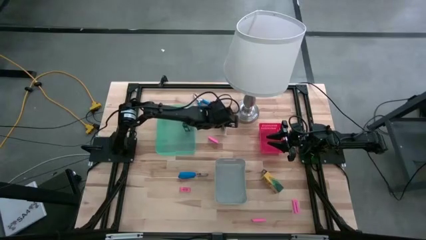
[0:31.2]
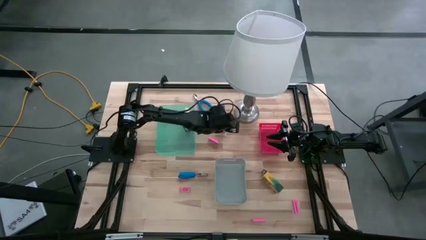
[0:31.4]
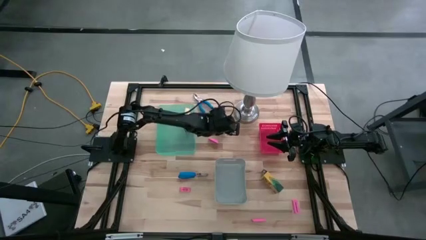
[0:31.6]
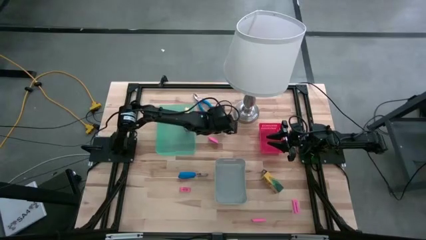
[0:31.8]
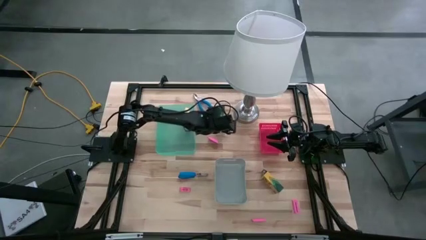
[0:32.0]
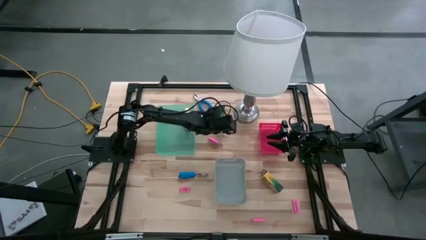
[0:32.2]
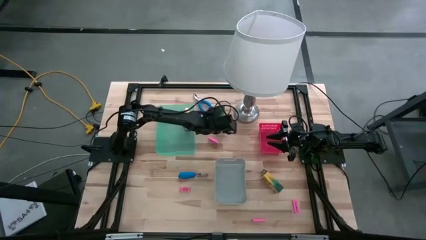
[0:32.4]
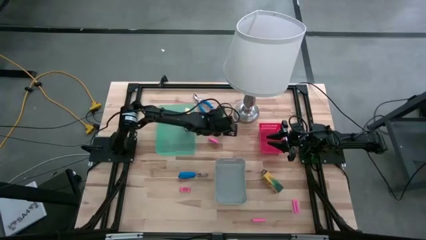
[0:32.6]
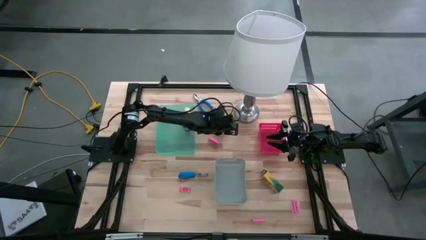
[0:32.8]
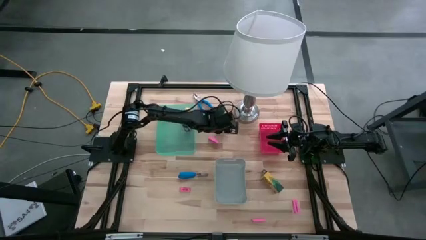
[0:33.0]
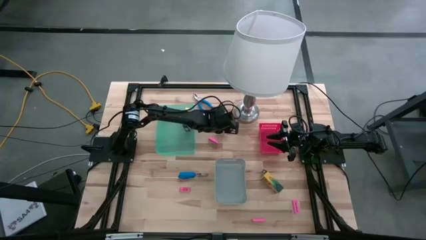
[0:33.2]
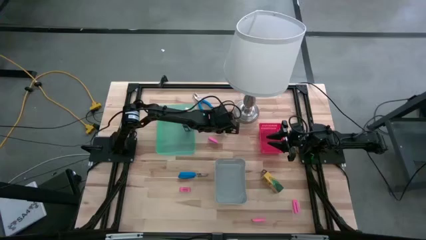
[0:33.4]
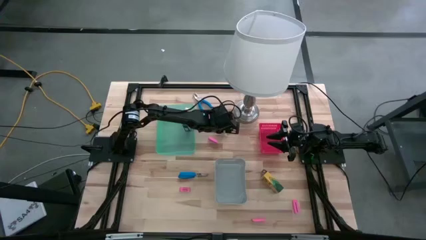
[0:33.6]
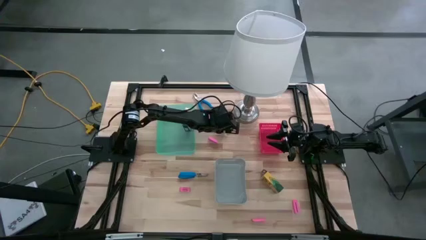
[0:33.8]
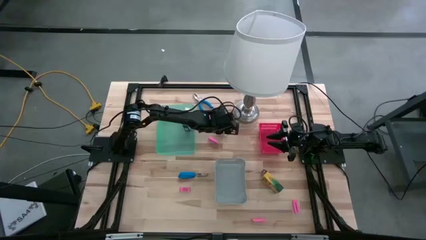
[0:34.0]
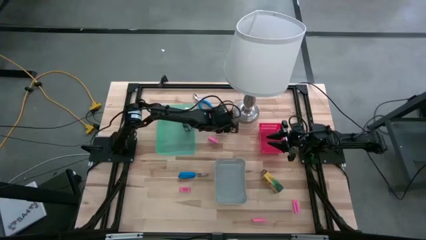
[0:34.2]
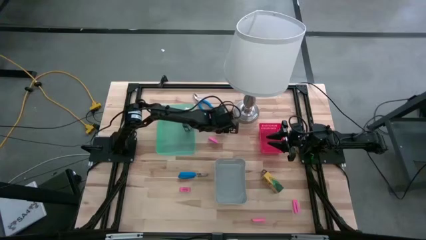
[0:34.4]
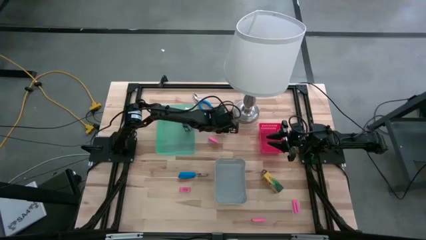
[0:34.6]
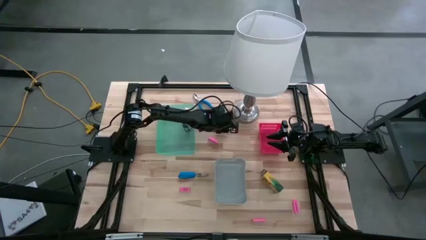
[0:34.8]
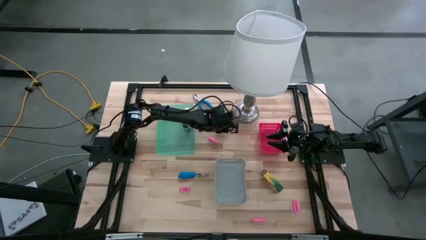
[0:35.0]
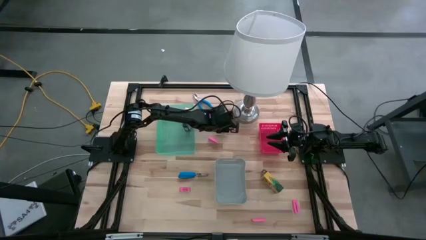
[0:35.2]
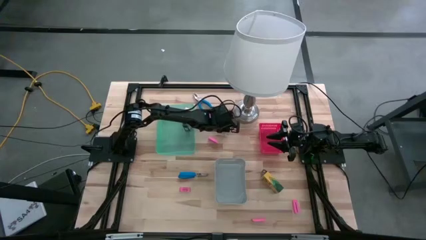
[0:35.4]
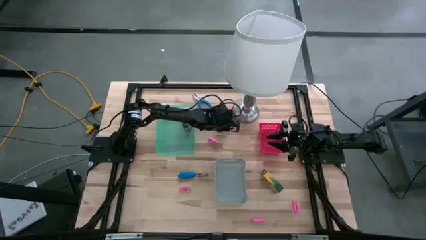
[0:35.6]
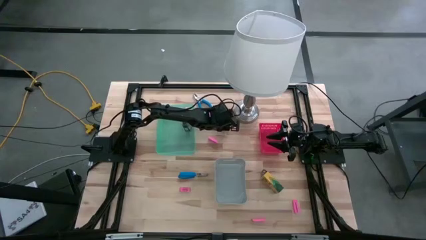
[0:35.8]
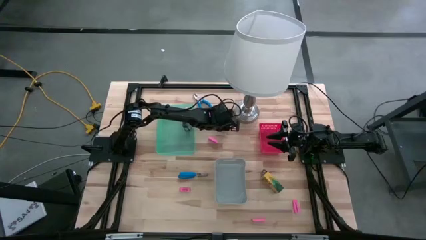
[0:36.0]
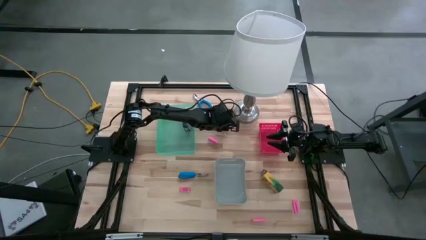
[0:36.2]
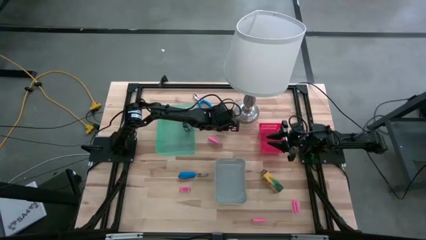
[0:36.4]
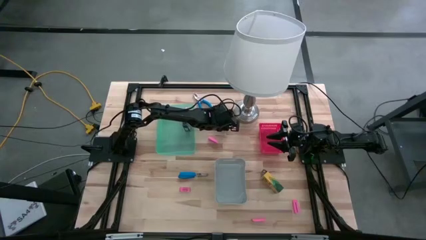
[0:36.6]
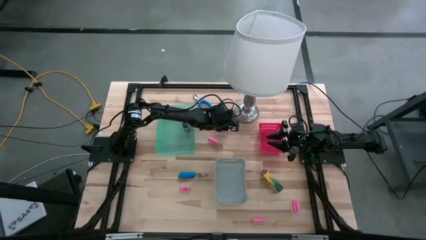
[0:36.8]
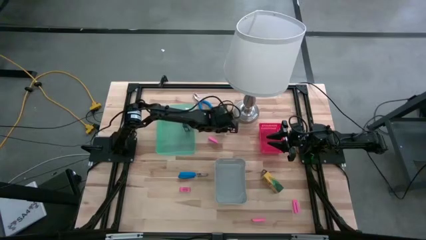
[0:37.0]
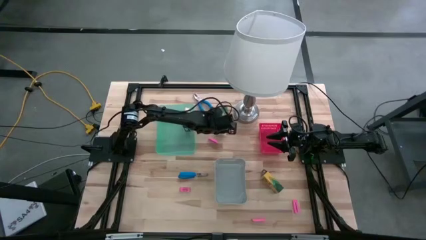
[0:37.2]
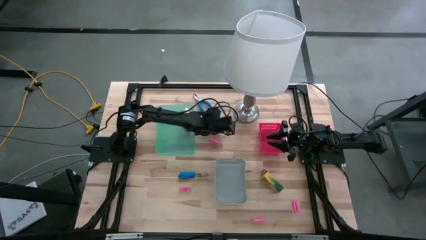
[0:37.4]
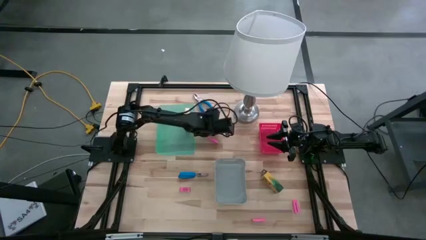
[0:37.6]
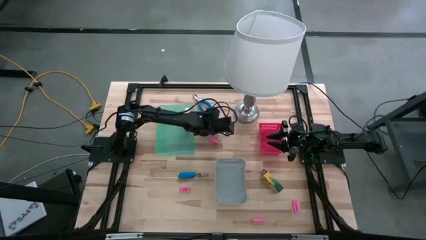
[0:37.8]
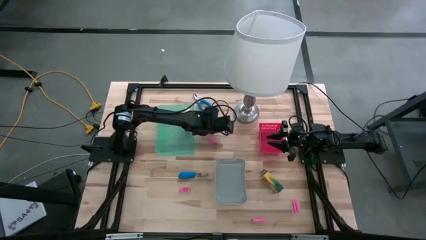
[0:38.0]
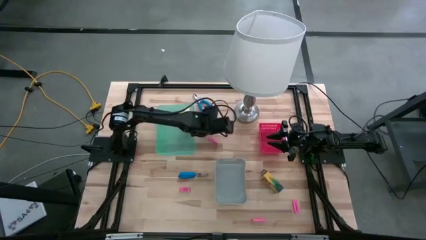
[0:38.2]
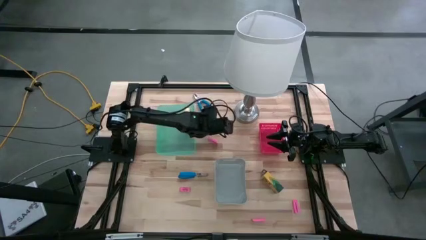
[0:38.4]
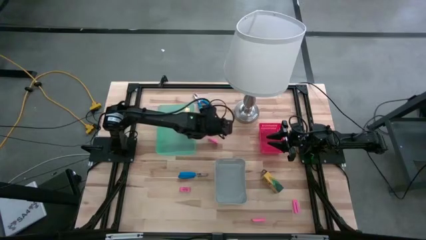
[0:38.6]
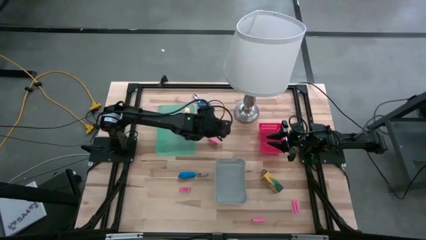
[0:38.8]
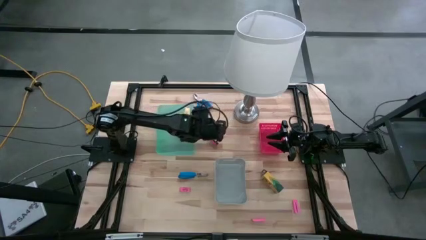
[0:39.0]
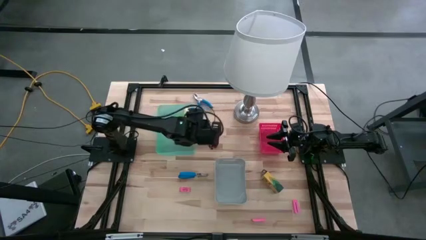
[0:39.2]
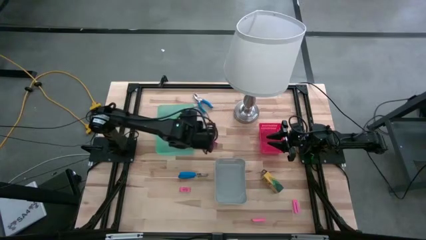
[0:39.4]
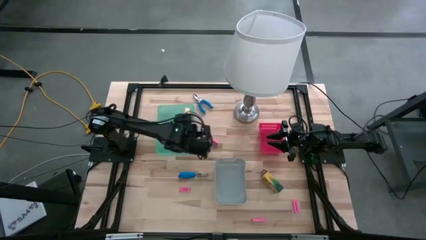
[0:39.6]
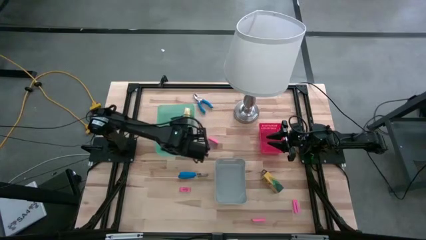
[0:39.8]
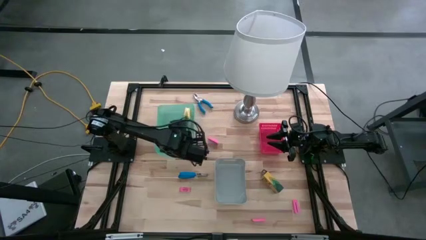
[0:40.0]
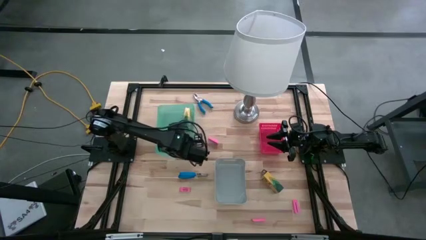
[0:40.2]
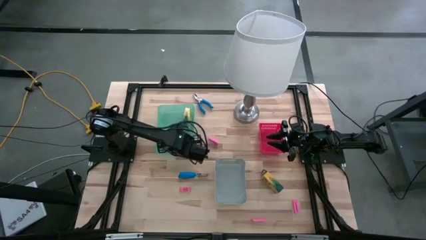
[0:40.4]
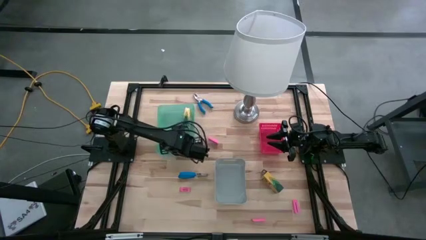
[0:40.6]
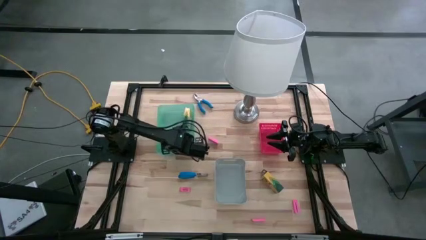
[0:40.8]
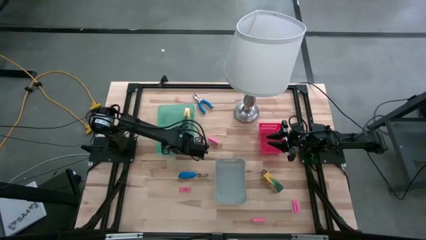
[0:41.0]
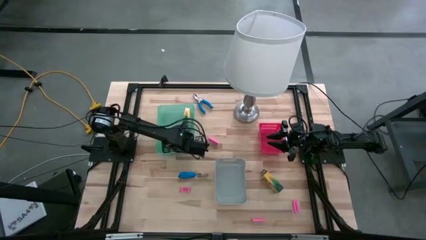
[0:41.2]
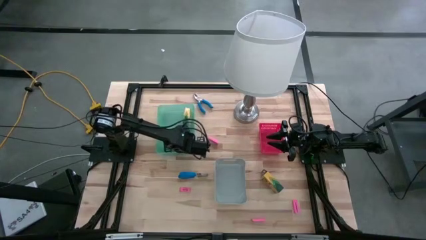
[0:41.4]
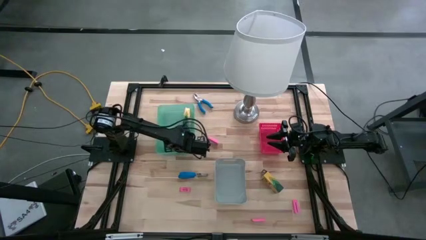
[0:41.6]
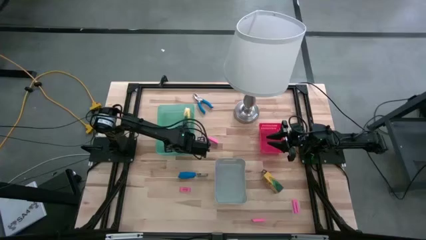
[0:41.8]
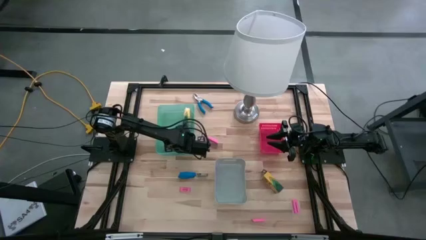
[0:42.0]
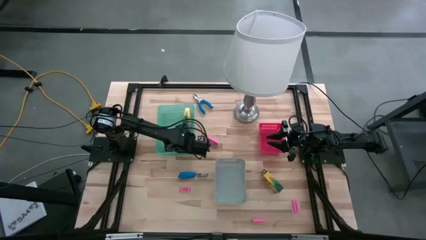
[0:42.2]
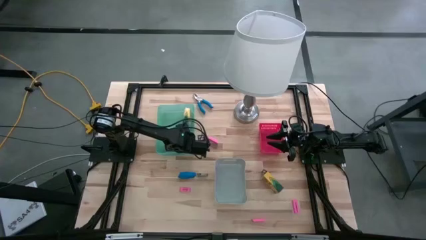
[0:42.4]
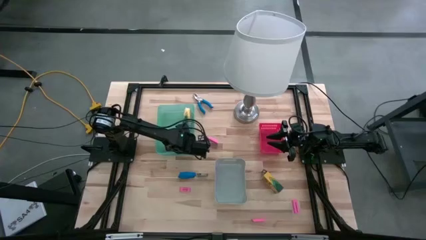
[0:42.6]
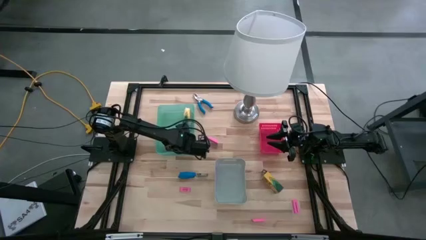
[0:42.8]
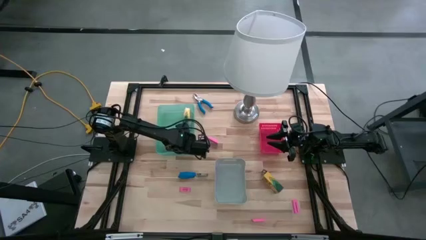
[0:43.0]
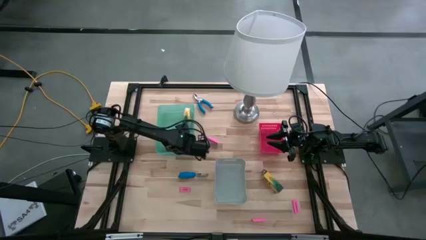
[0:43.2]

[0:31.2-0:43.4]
Task: Pick & Place School Supplies
Put the crayon box into the green bin

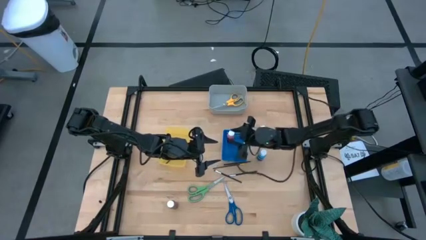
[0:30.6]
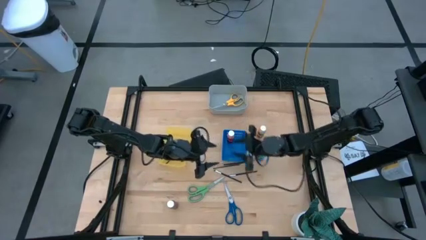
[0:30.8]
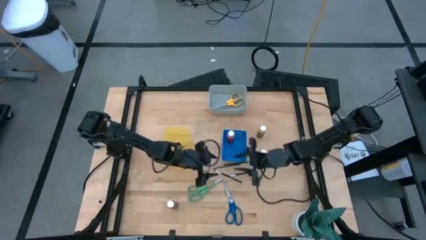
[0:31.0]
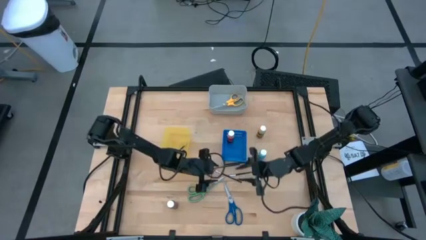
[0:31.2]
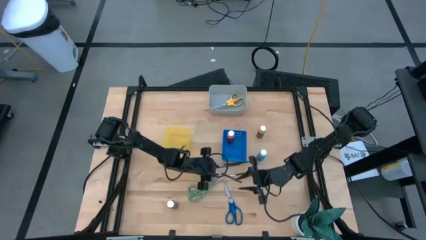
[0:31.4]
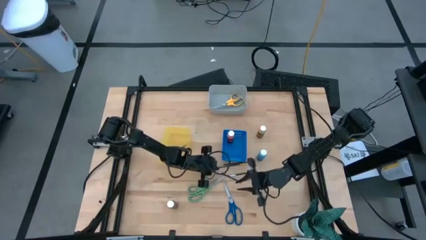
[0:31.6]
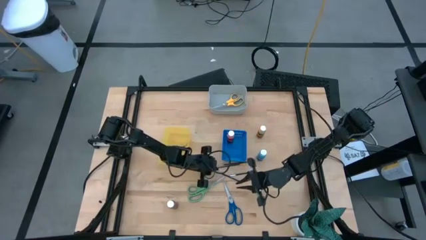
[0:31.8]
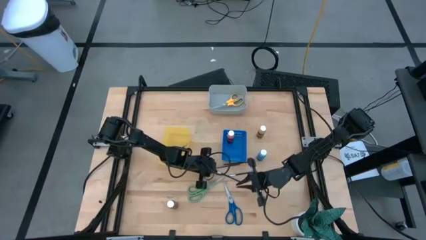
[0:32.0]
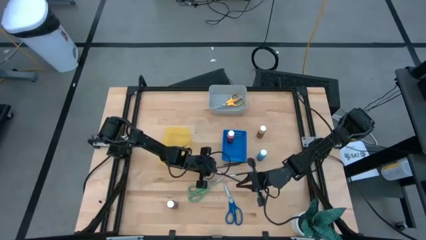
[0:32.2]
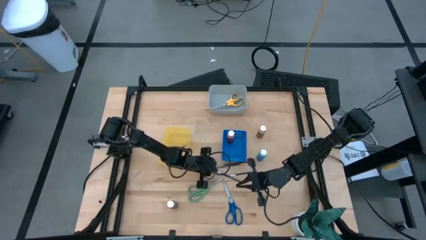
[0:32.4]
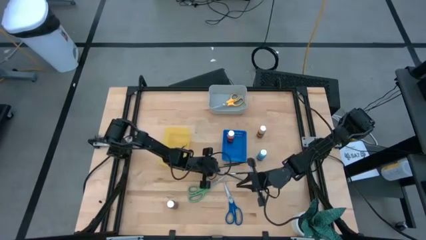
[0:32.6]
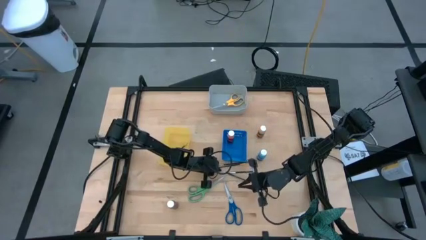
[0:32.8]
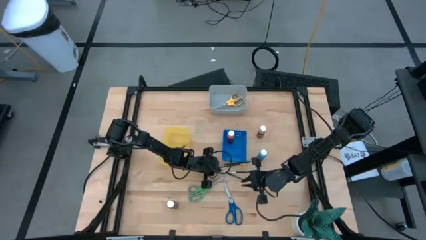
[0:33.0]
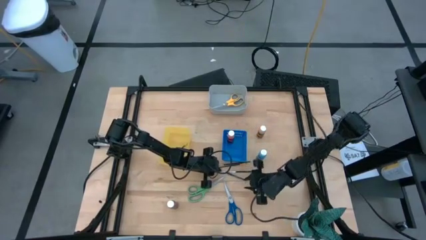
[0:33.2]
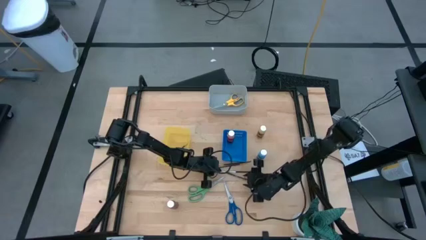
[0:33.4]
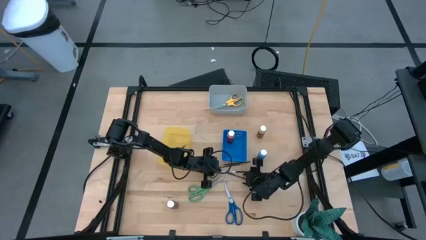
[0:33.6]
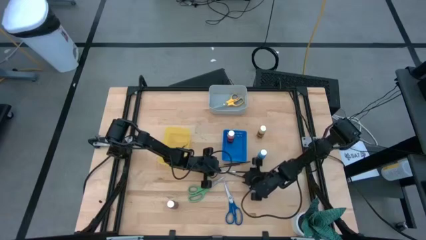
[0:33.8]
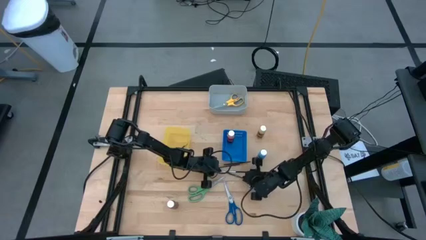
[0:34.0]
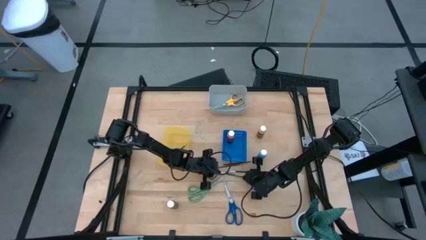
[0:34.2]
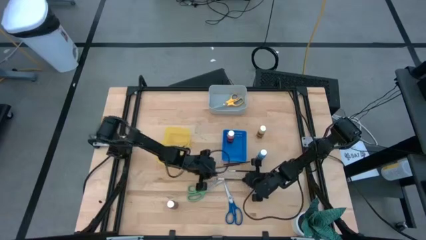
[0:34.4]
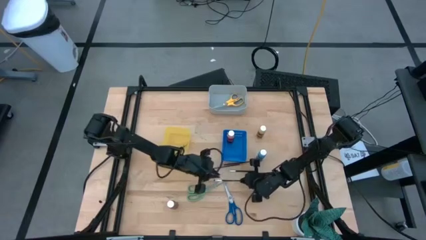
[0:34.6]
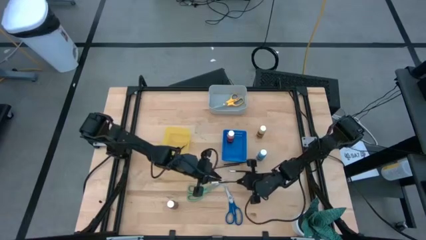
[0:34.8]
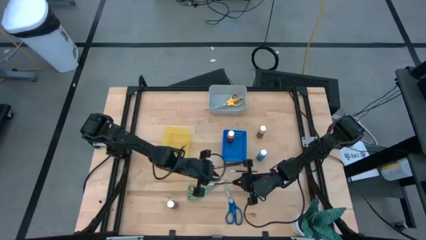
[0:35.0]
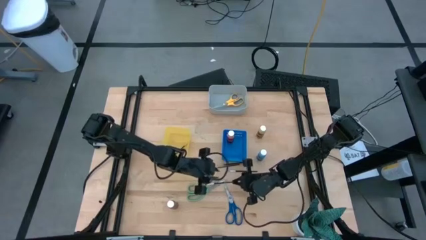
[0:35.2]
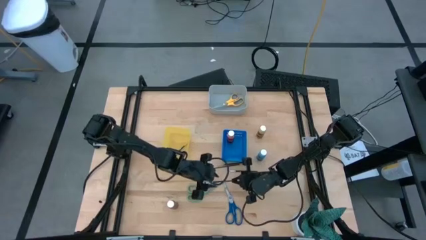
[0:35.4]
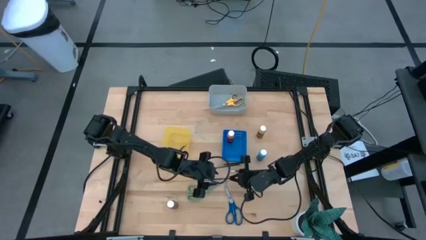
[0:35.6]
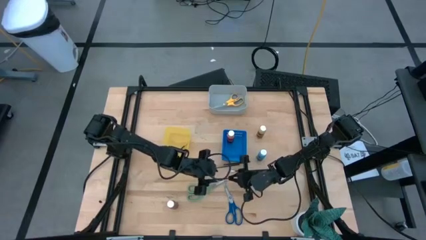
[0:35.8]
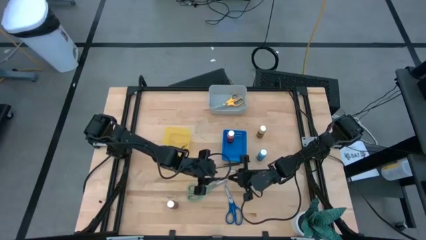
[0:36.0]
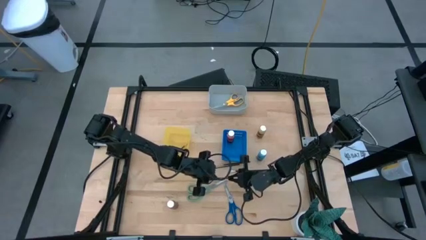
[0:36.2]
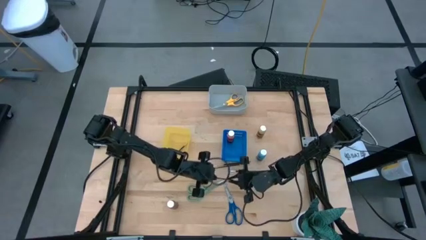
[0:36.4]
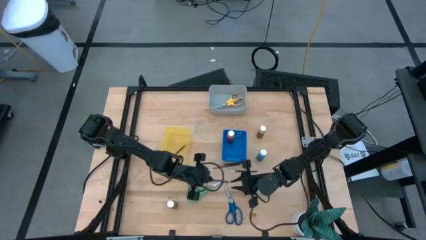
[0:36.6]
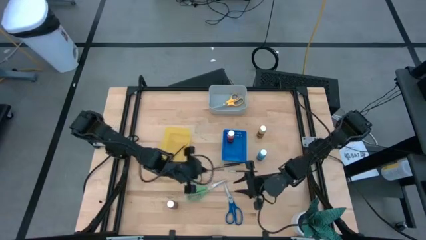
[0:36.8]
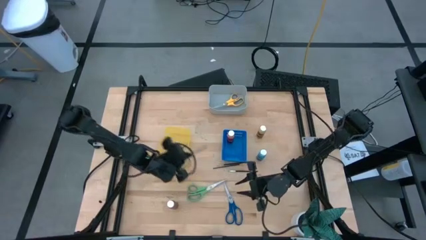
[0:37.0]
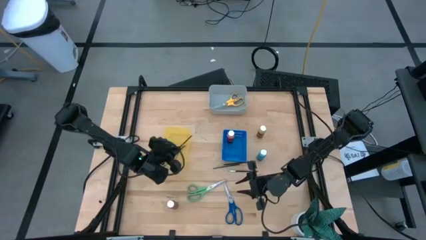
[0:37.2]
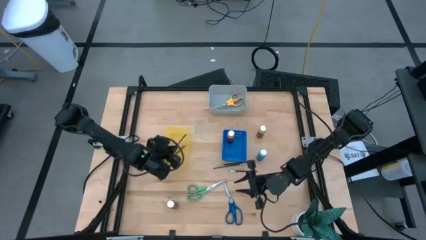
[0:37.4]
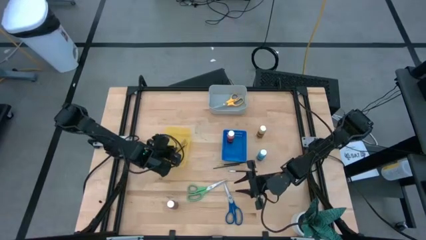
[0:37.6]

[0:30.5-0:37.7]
Task: Pick & Place Paint Supplies
Put the left silver paint brush into the yellow bin
